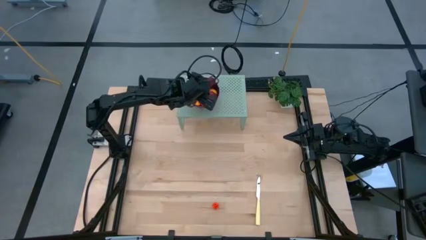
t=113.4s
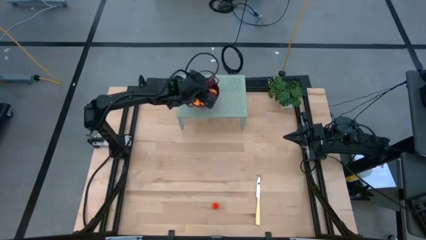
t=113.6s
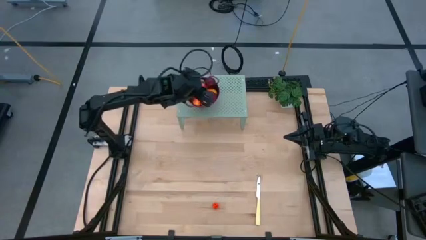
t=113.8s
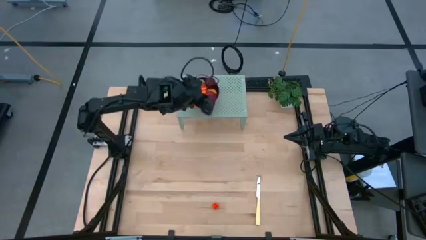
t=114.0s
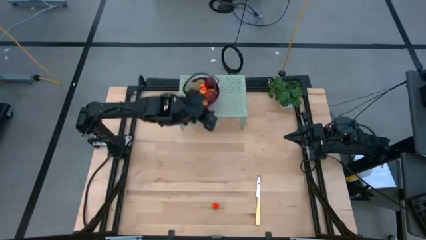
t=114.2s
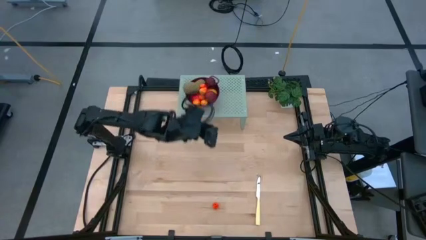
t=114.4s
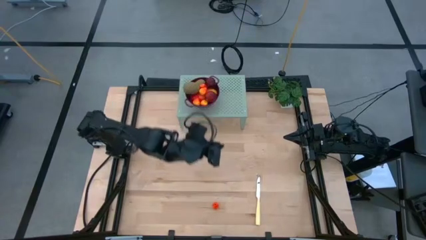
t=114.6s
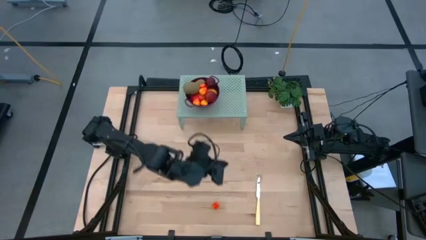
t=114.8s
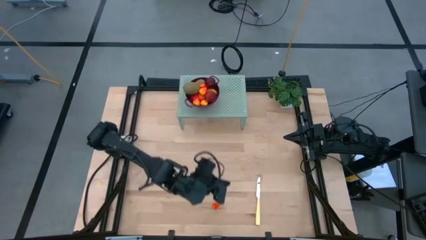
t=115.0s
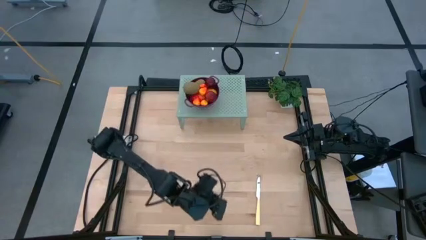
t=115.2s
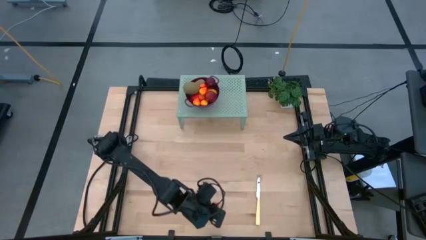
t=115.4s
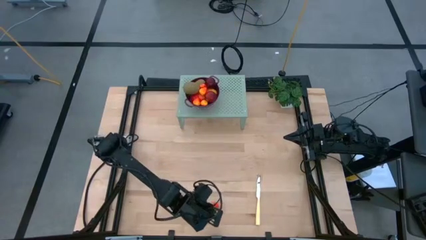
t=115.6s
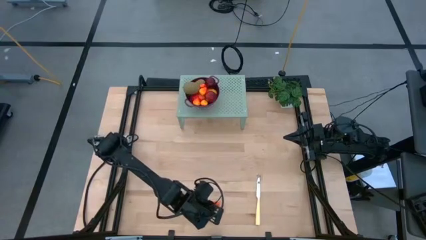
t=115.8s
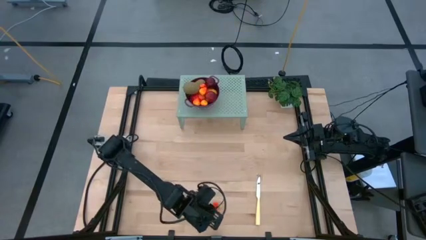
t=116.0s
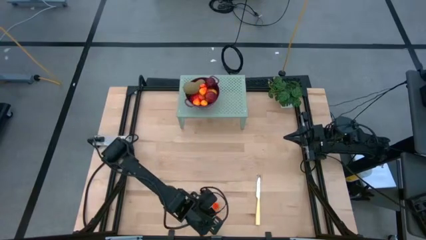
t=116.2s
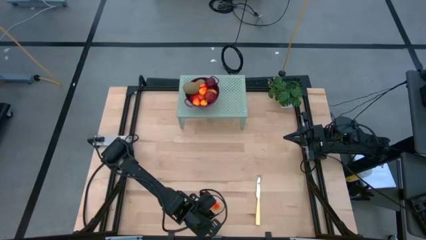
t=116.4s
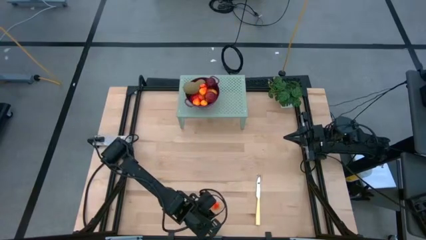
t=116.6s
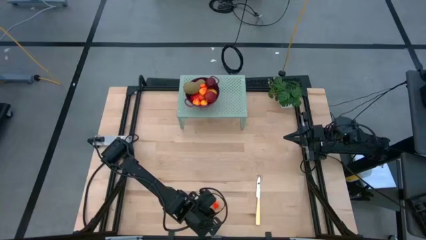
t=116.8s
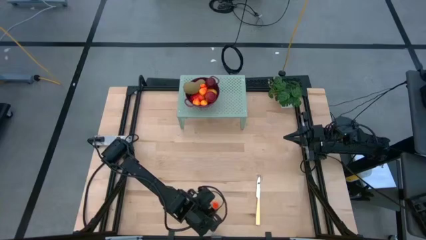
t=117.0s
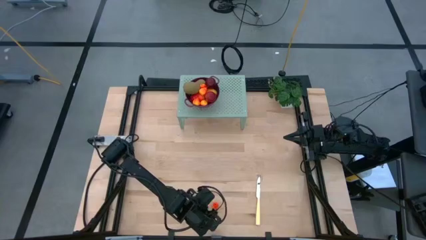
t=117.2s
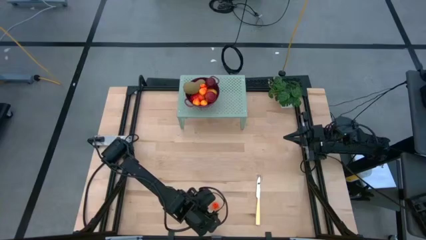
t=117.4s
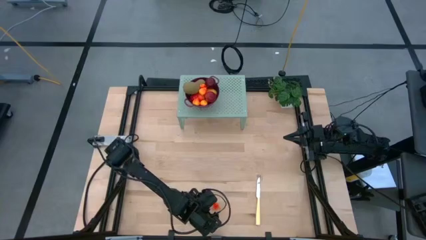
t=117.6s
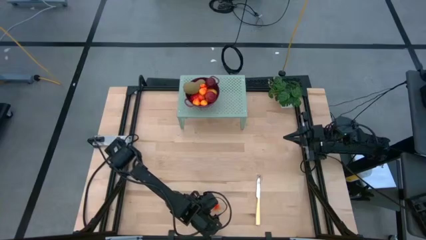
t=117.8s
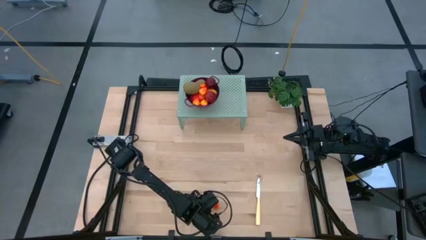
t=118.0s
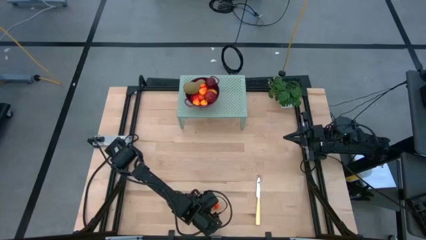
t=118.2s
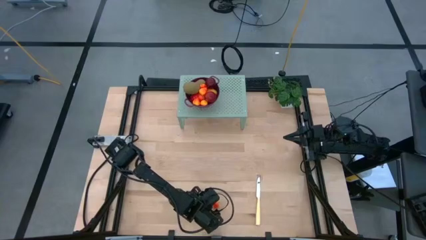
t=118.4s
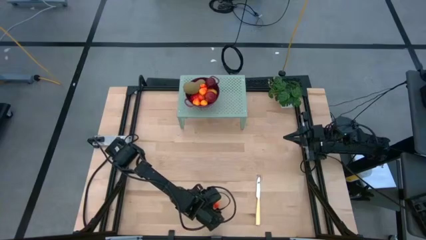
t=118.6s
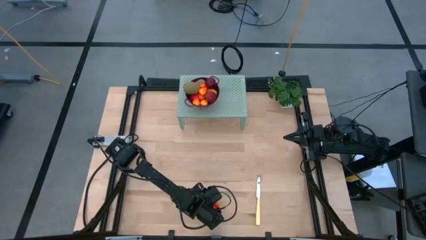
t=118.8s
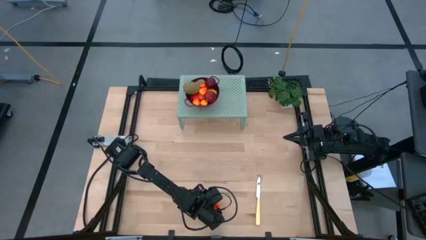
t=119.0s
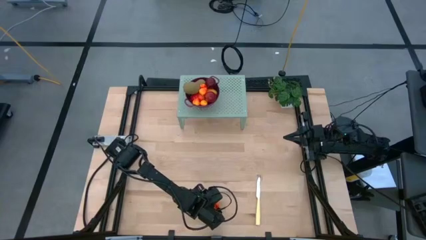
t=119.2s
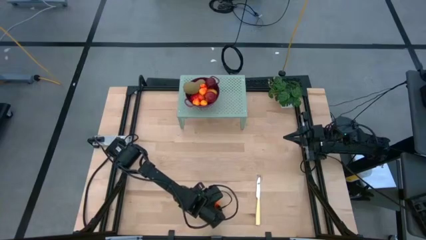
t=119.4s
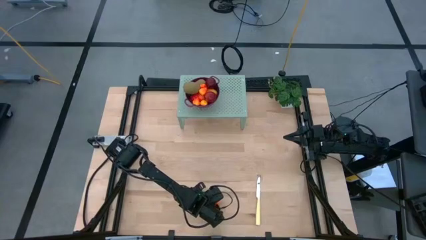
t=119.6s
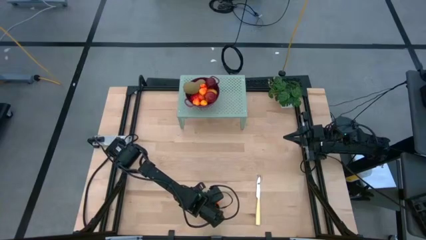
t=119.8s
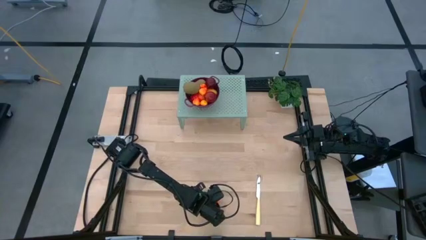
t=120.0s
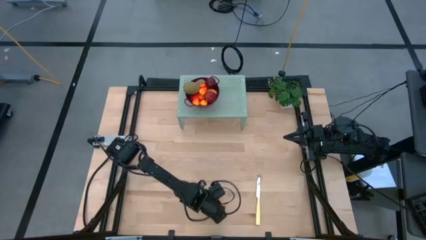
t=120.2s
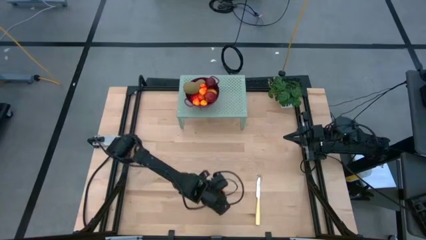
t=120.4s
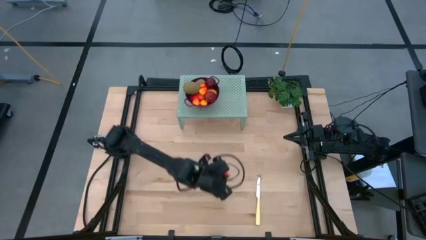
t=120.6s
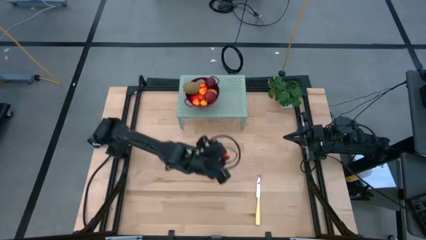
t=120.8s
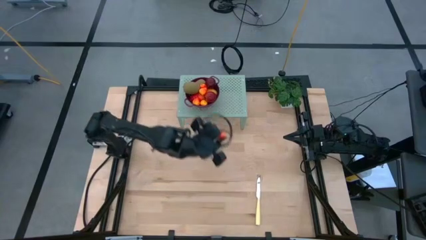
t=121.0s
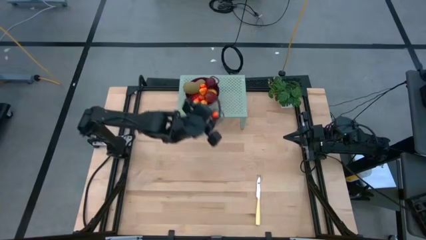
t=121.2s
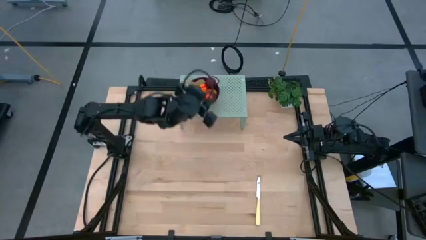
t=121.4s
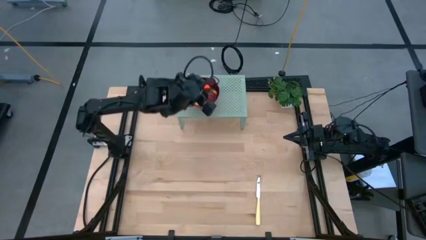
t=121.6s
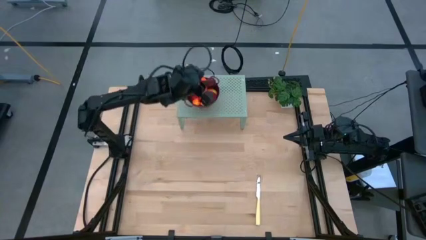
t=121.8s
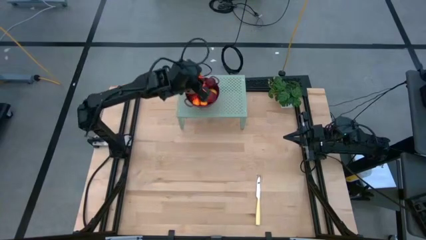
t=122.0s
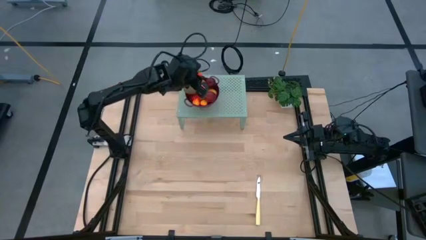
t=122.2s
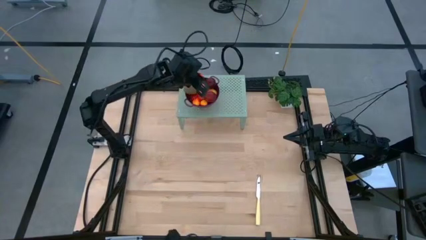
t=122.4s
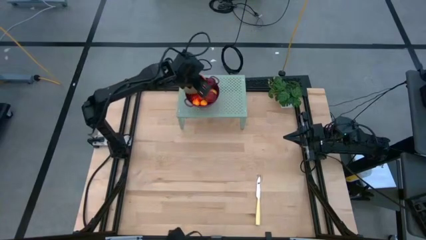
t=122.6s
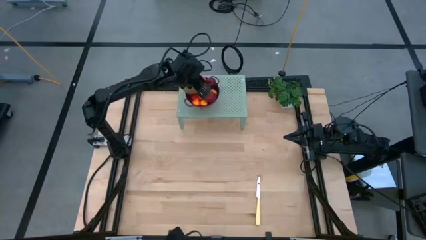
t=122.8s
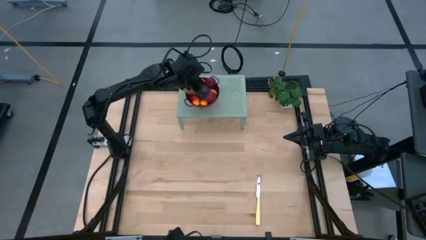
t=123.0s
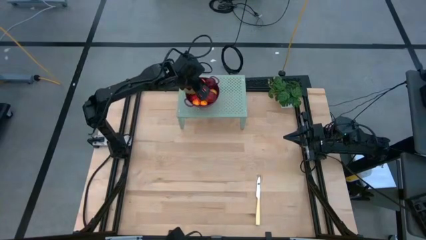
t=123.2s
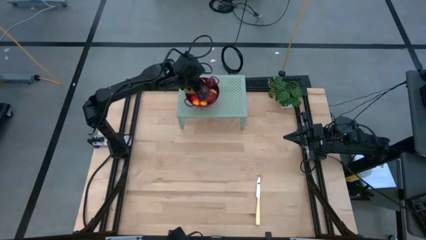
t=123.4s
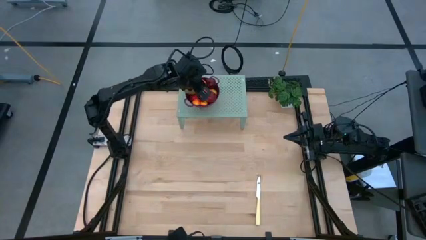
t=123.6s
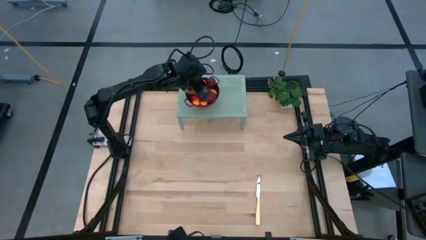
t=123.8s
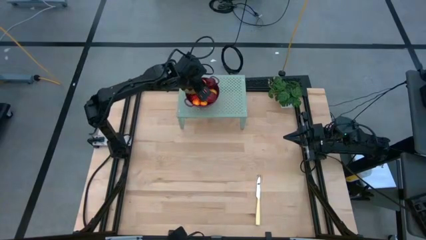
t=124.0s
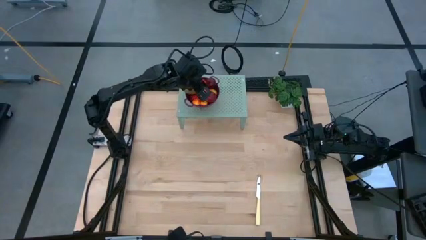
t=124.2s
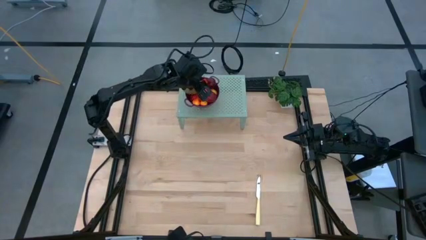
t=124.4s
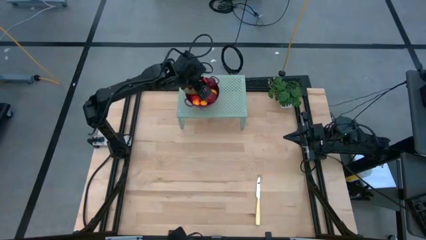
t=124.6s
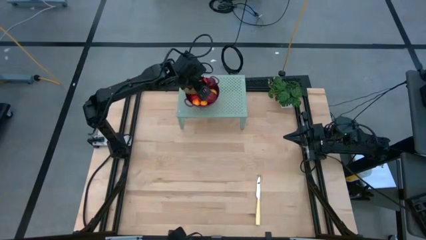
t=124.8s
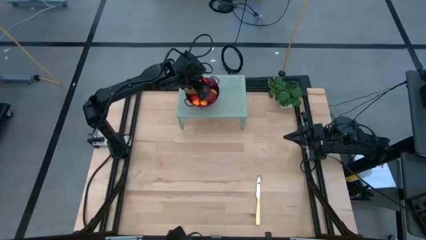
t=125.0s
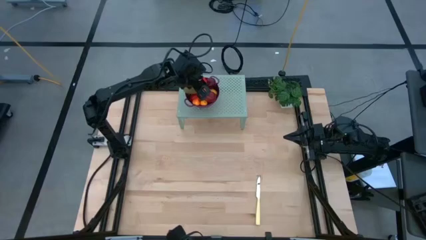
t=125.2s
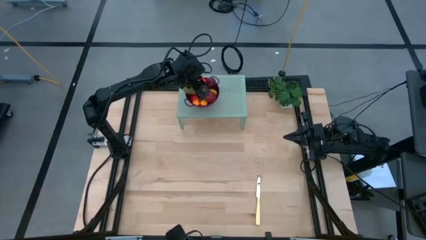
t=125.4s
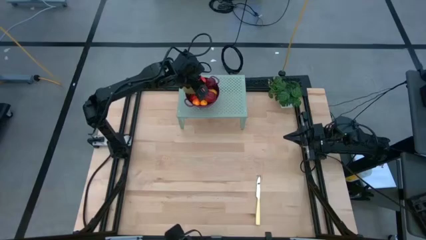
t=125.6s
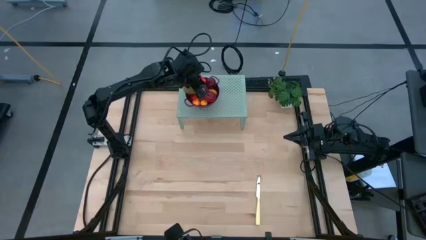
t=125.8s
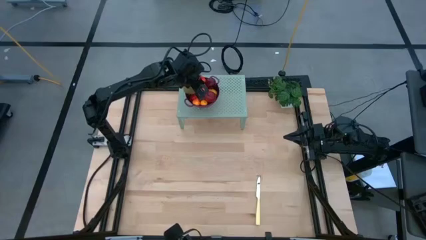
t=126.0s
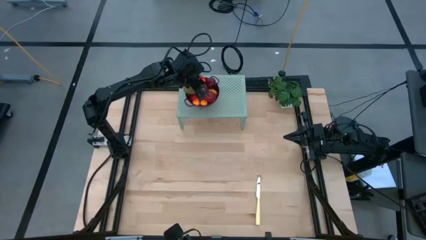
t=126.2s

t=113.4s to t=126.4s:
Task: Pick & Place Fruit
Put the orange peach in the red strainer bowl on the shelf

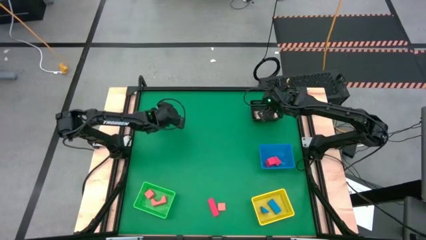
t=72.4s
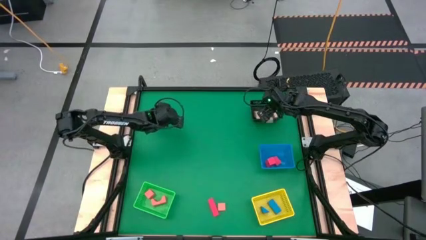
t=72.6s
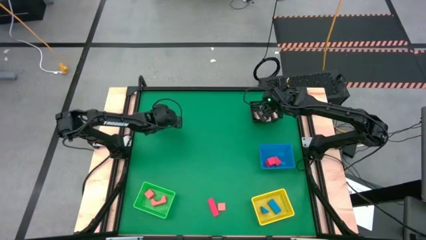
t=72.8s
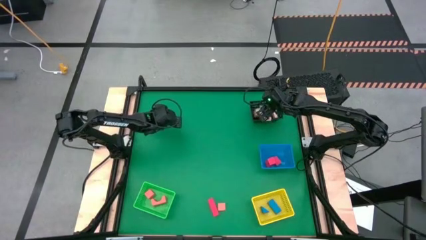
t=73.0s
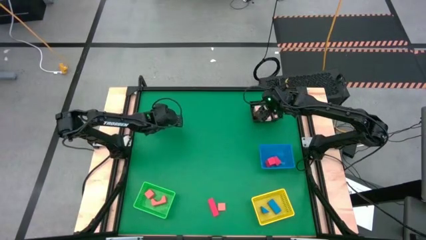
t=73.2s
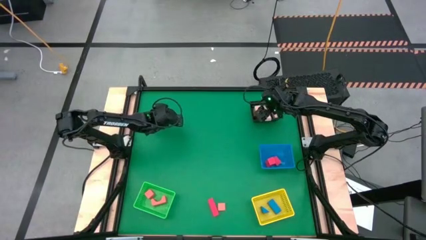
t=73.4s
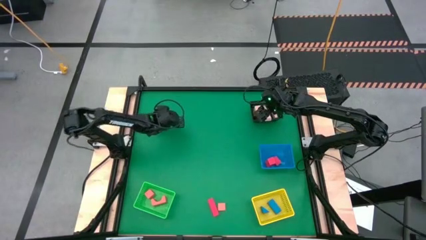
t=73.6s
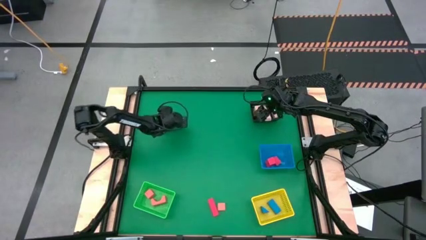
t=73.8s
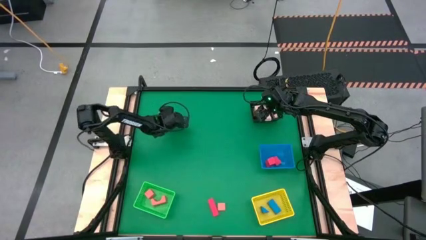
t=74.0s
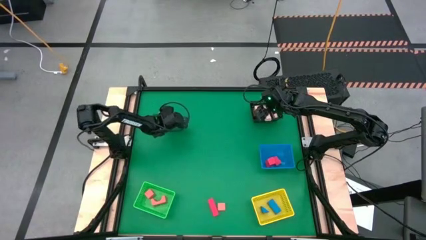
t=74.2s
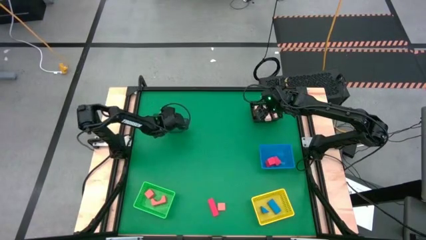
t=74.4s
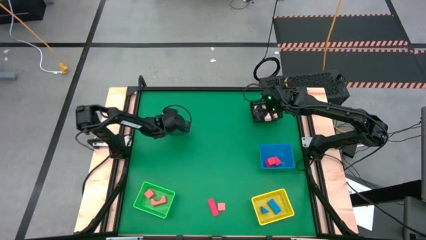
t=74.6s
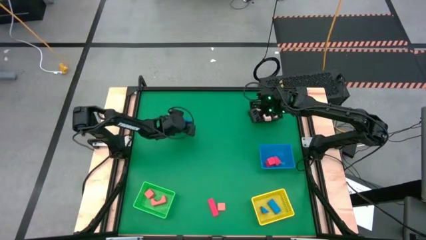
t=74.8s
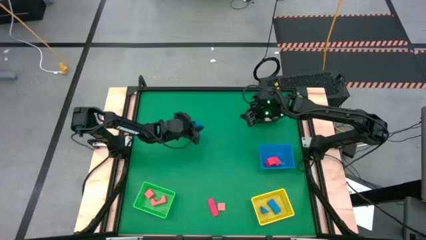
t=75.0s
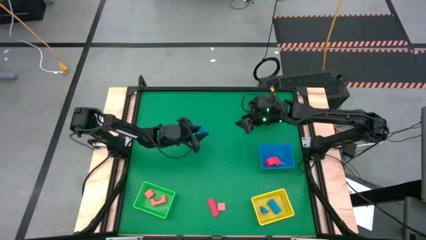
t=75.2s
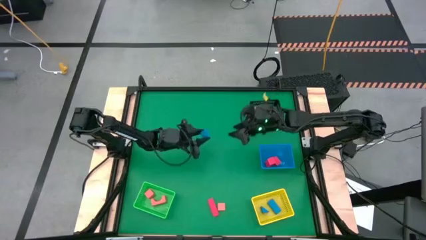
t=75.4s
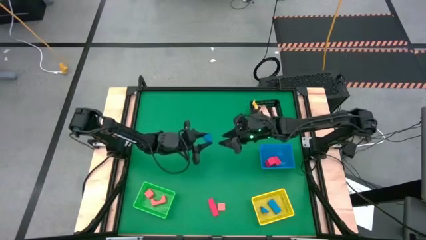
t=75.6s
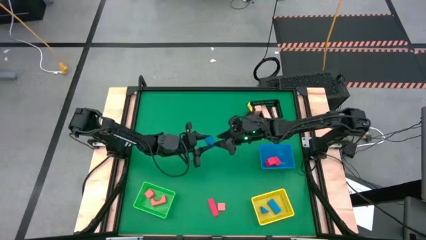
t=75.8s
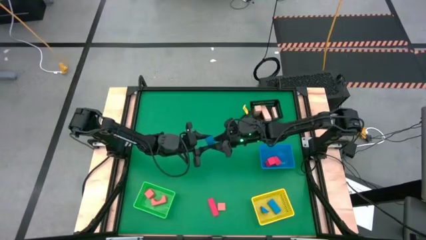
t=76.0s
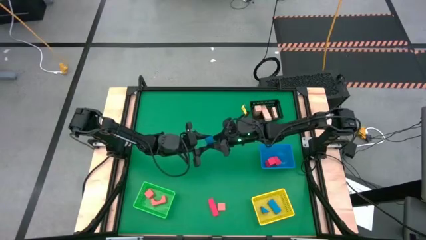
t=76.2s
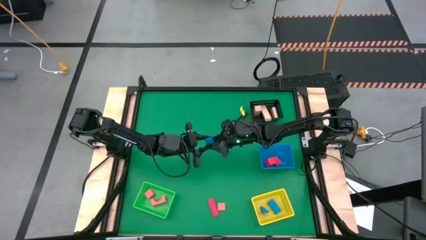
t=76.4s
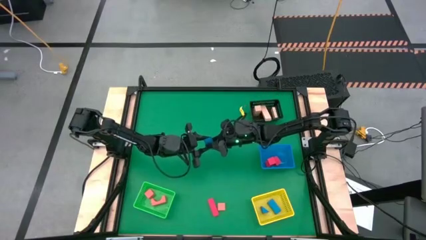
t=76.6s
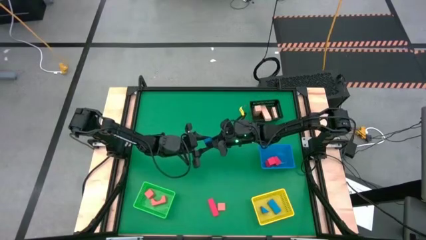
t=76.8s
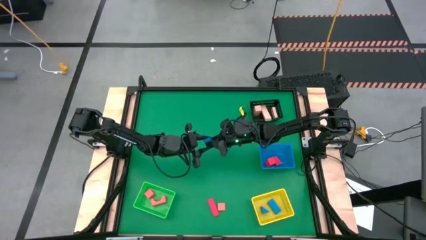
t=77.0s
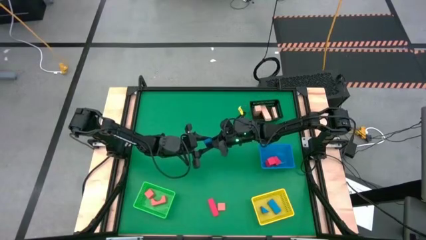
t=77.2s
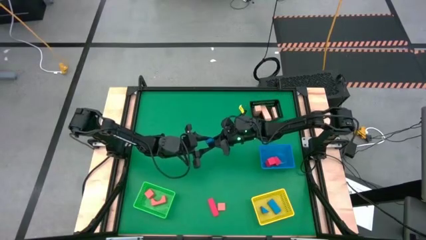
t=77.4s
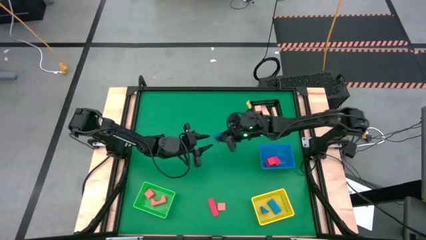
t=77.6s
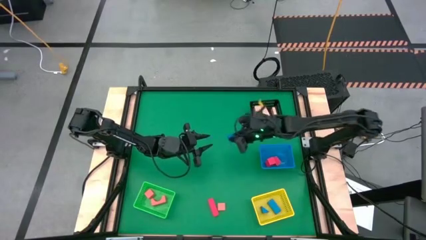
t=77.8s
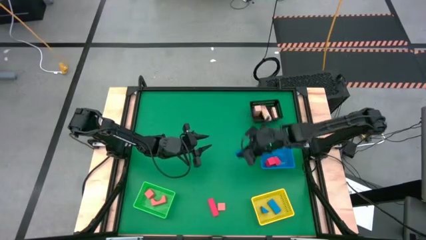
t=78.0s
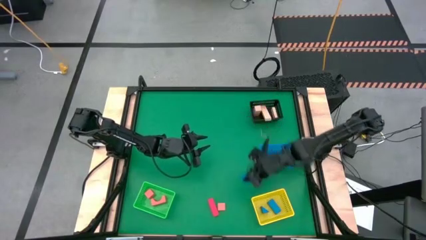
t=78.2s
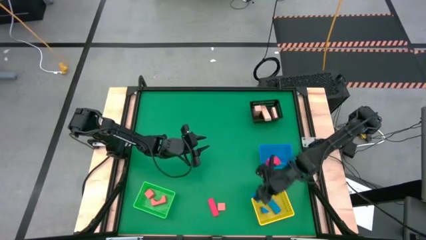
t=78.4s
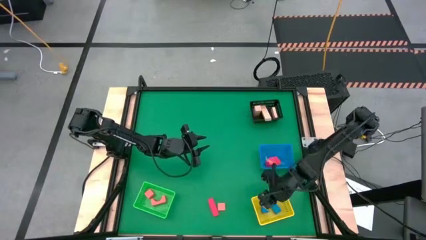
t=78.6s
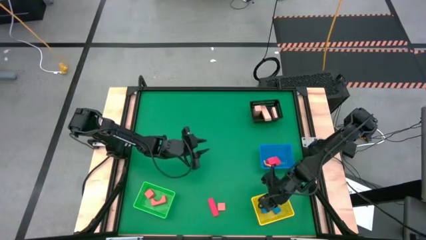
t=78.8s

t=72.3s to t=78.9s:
Task: Sort & place blocks by color
Put the blue block into the yellow bin
